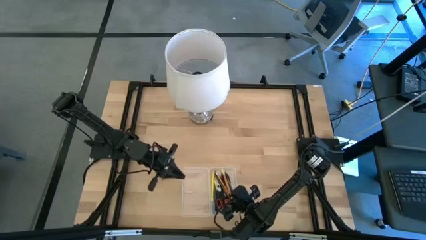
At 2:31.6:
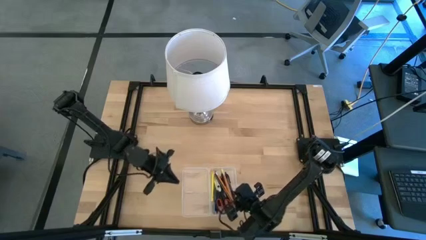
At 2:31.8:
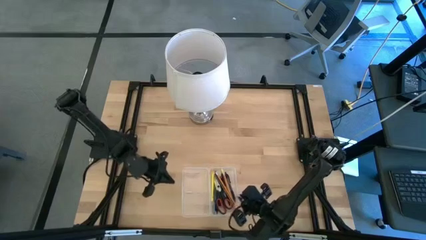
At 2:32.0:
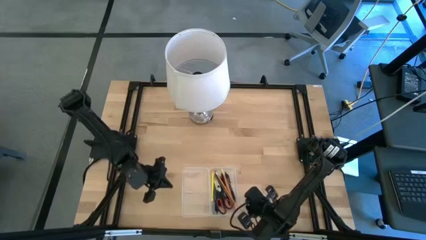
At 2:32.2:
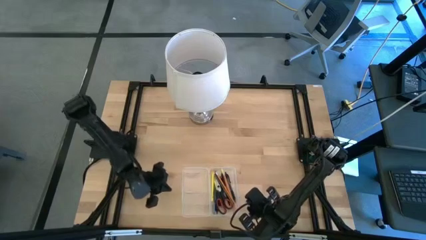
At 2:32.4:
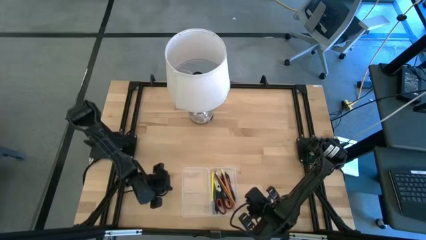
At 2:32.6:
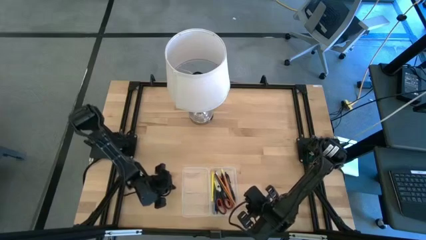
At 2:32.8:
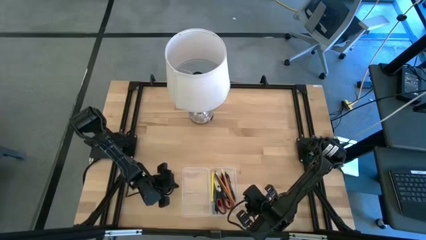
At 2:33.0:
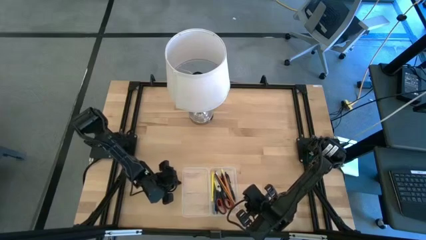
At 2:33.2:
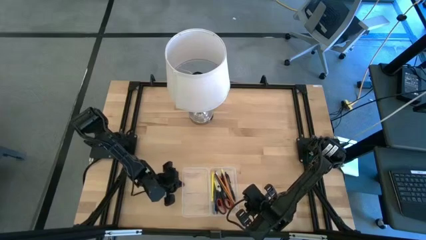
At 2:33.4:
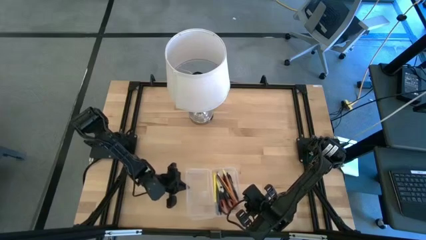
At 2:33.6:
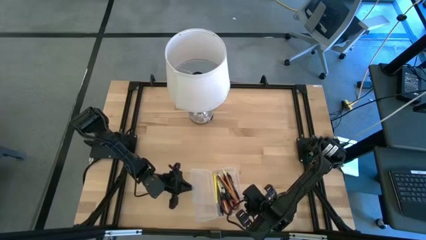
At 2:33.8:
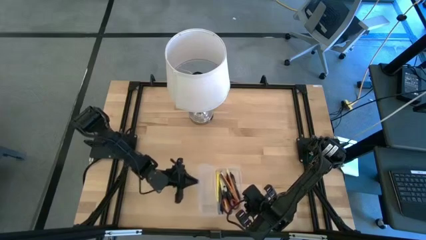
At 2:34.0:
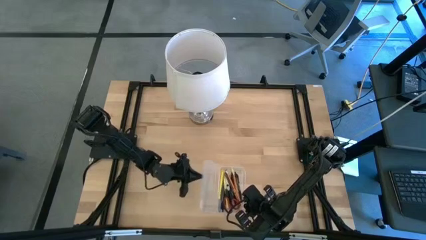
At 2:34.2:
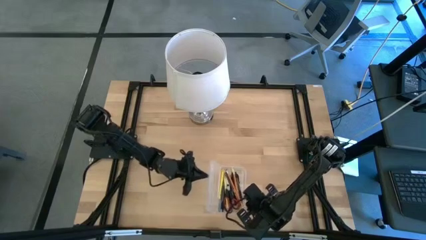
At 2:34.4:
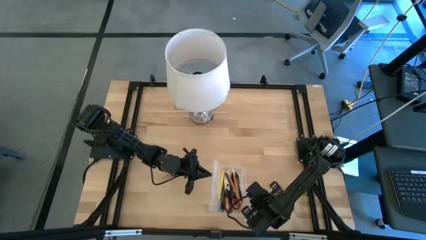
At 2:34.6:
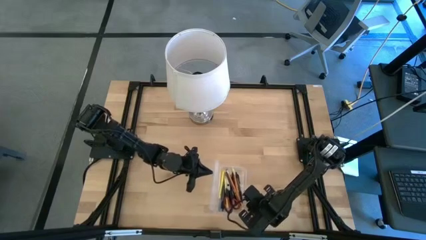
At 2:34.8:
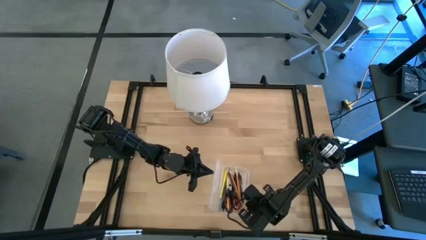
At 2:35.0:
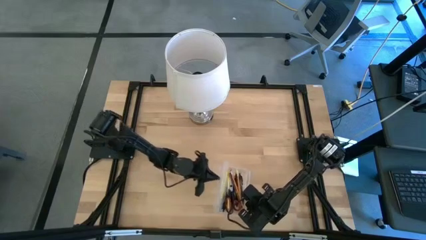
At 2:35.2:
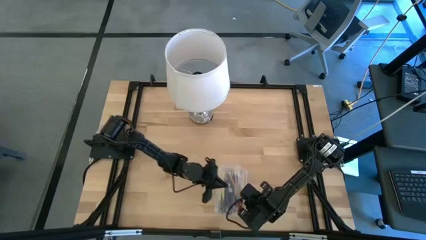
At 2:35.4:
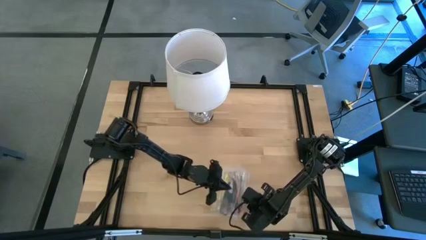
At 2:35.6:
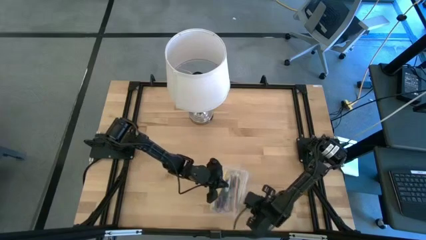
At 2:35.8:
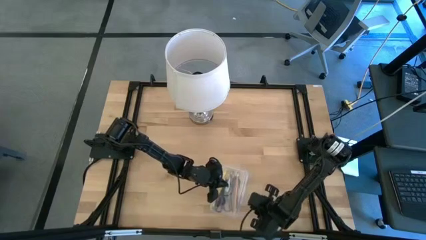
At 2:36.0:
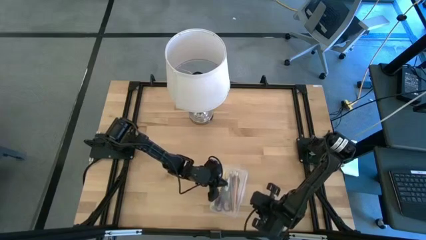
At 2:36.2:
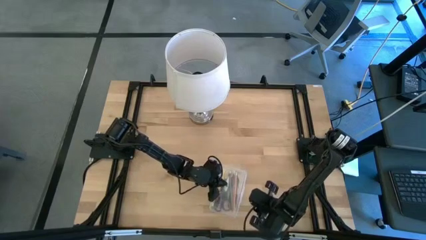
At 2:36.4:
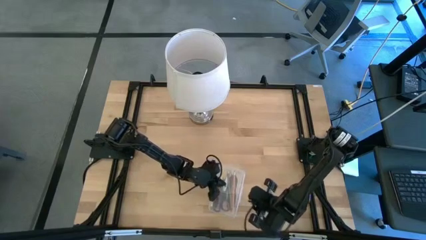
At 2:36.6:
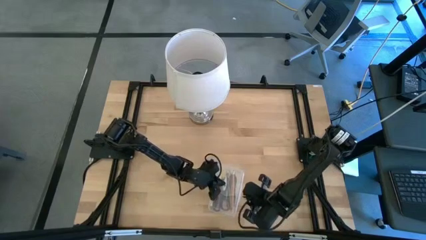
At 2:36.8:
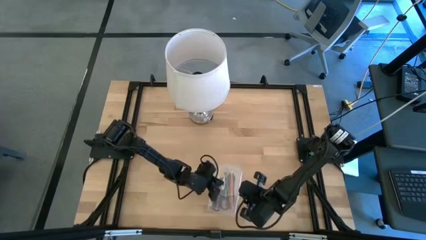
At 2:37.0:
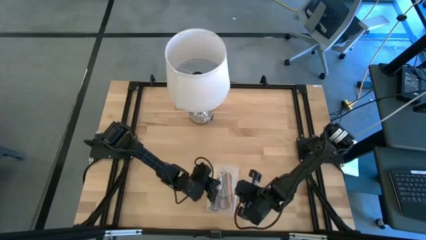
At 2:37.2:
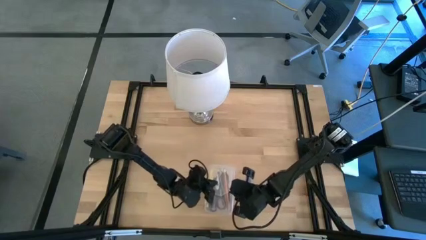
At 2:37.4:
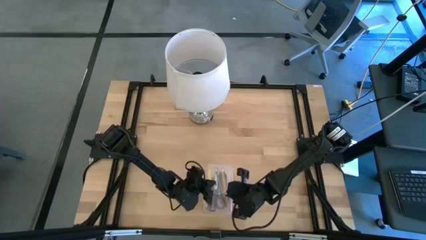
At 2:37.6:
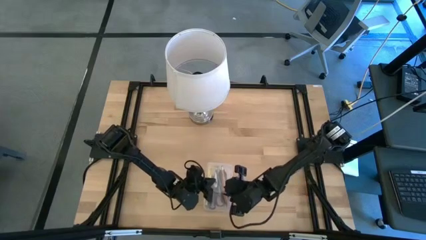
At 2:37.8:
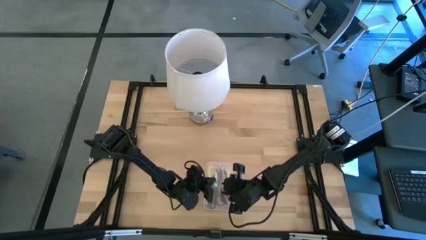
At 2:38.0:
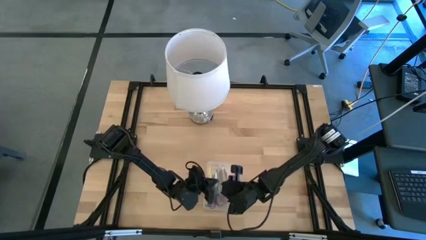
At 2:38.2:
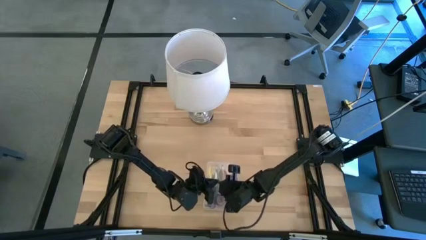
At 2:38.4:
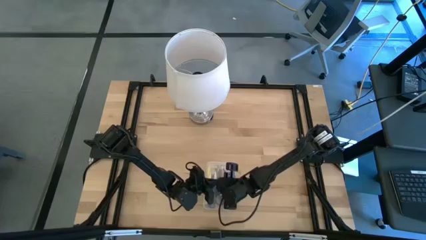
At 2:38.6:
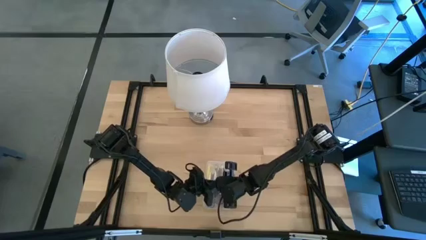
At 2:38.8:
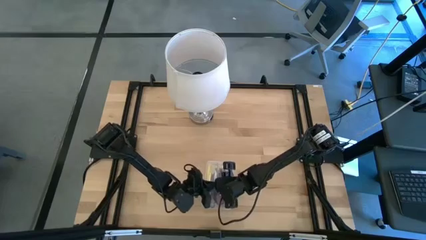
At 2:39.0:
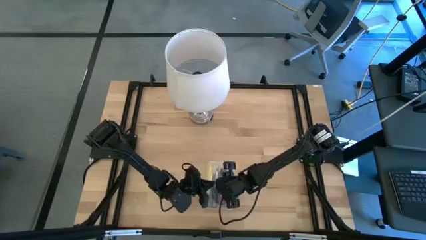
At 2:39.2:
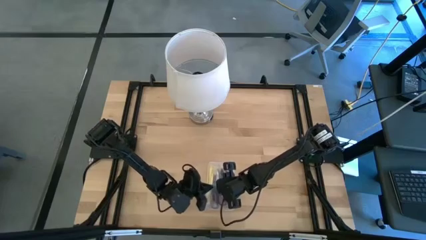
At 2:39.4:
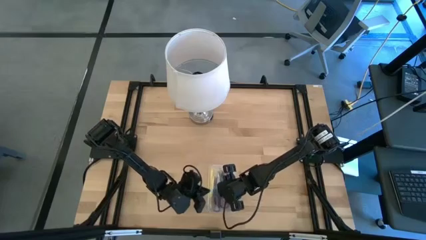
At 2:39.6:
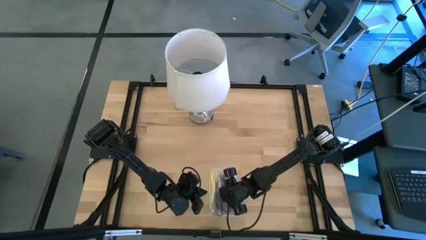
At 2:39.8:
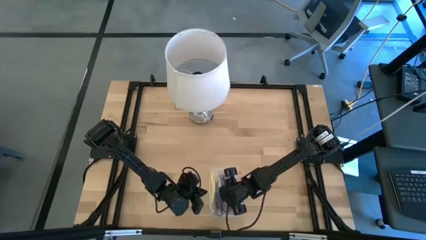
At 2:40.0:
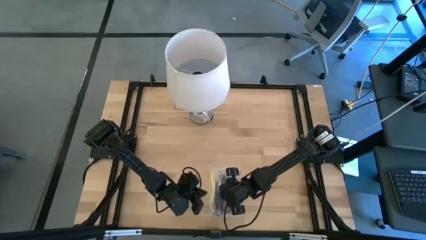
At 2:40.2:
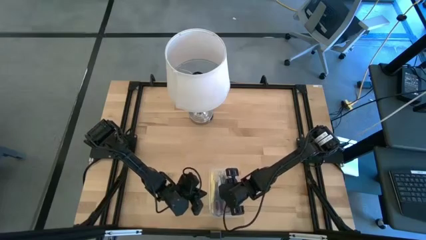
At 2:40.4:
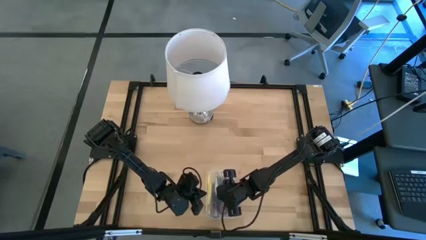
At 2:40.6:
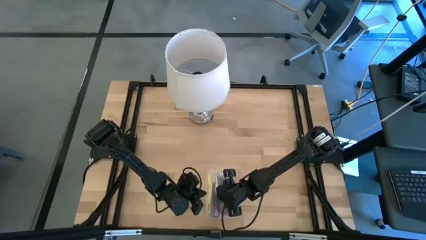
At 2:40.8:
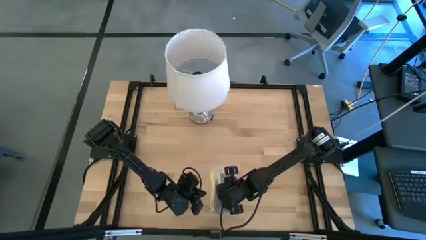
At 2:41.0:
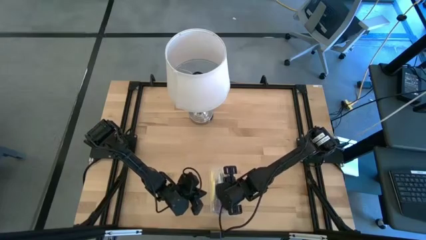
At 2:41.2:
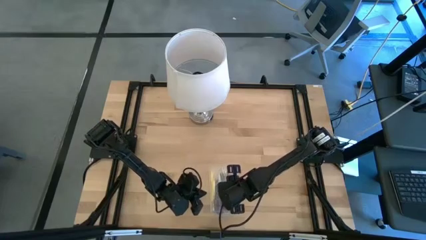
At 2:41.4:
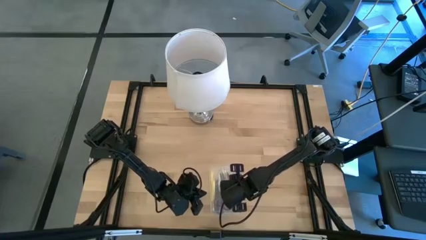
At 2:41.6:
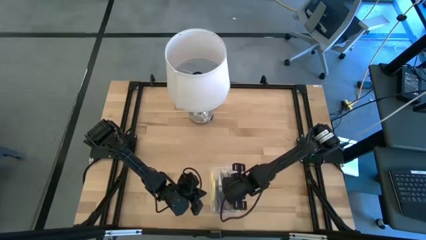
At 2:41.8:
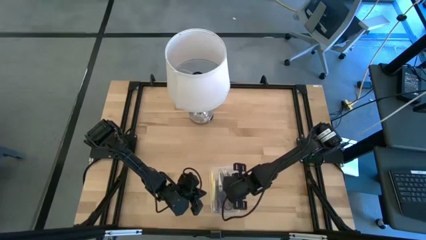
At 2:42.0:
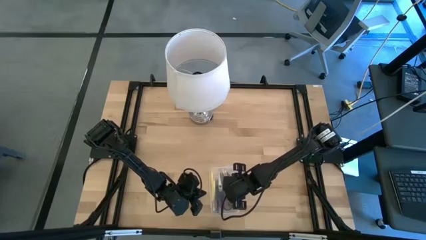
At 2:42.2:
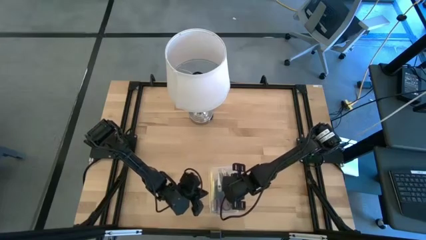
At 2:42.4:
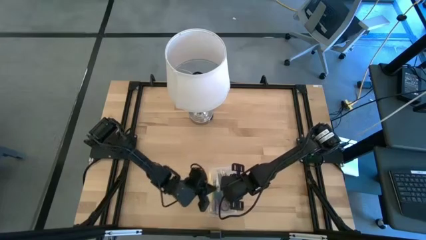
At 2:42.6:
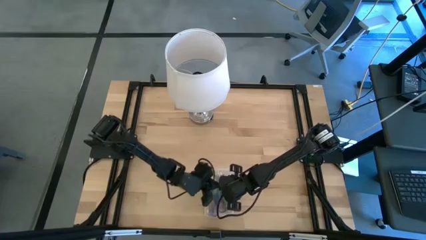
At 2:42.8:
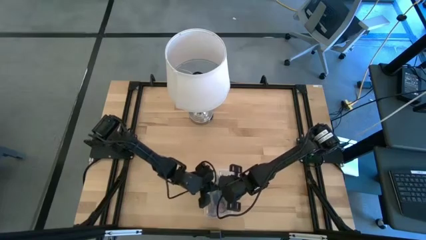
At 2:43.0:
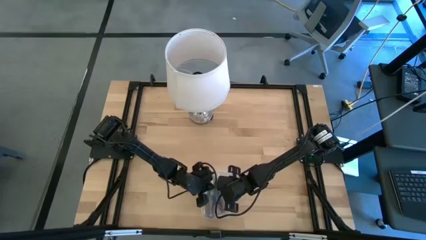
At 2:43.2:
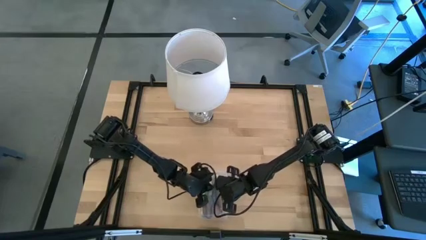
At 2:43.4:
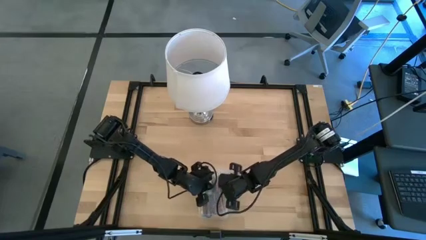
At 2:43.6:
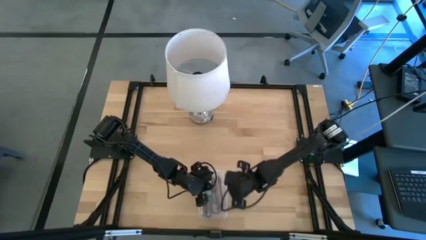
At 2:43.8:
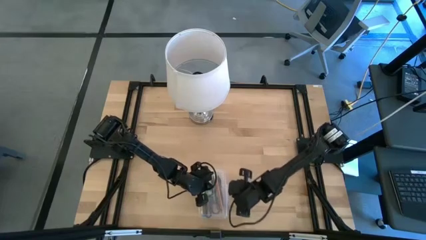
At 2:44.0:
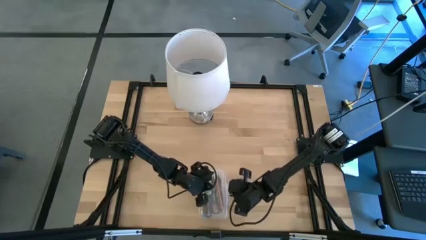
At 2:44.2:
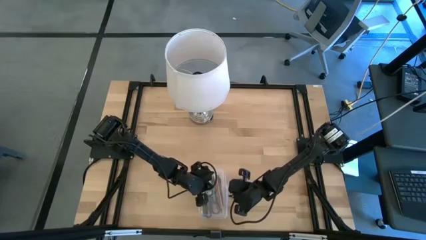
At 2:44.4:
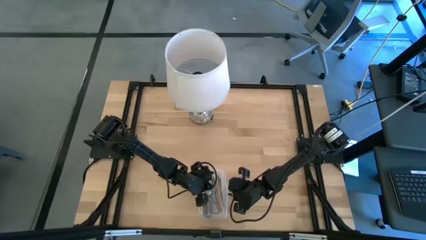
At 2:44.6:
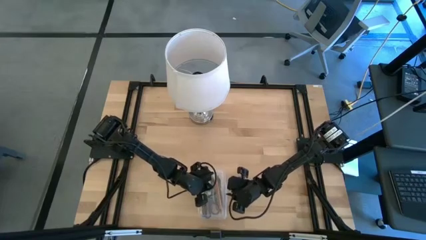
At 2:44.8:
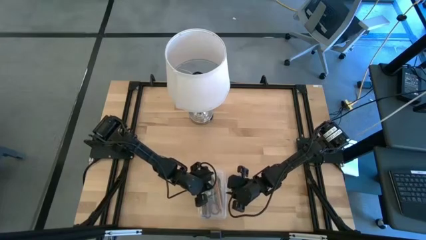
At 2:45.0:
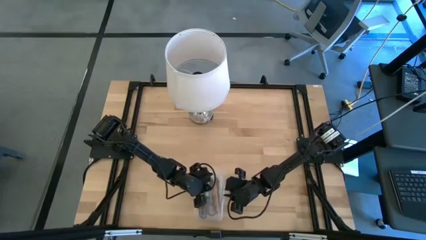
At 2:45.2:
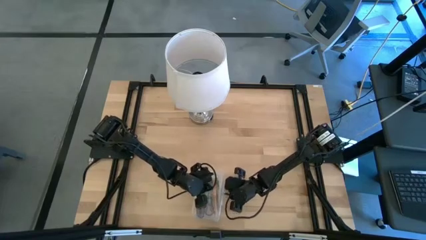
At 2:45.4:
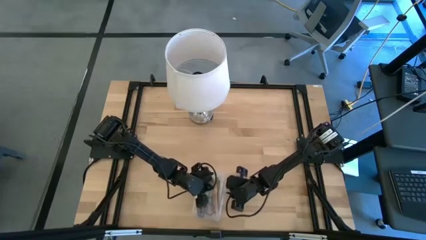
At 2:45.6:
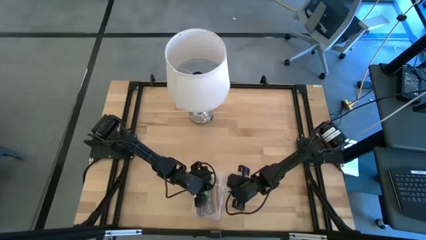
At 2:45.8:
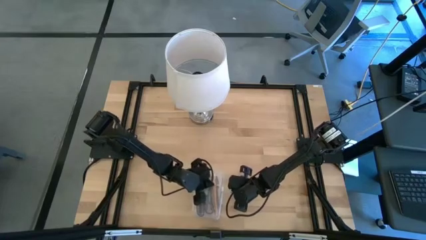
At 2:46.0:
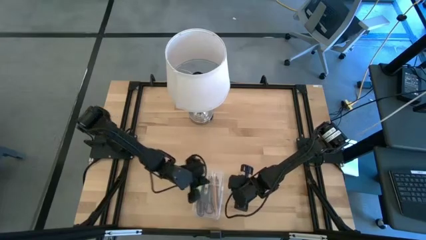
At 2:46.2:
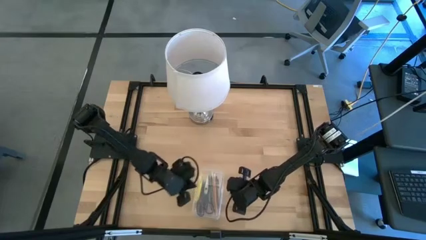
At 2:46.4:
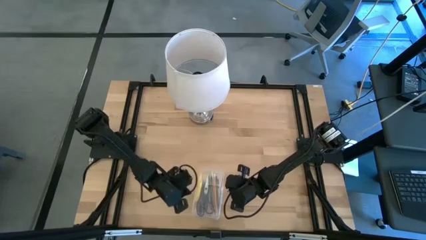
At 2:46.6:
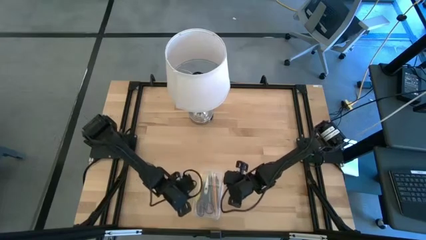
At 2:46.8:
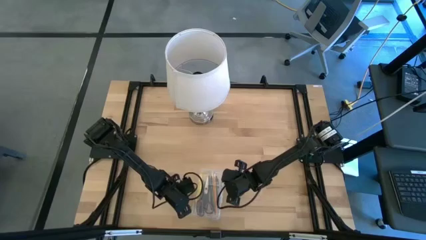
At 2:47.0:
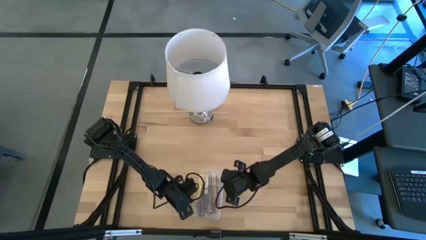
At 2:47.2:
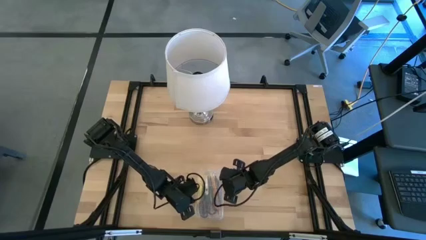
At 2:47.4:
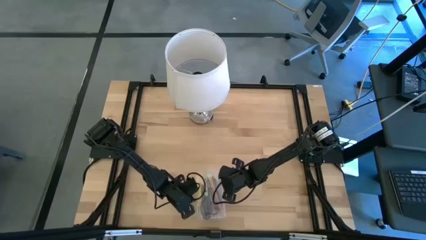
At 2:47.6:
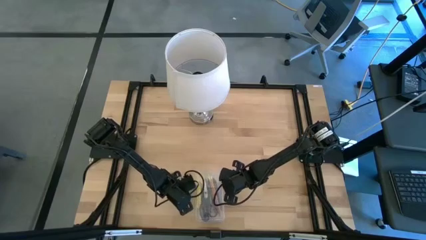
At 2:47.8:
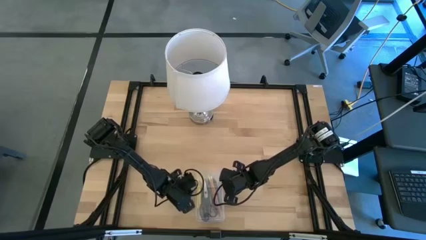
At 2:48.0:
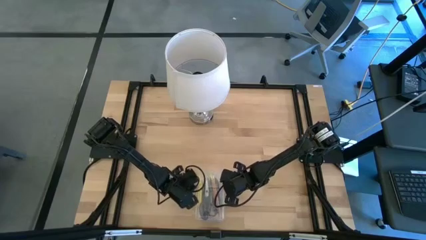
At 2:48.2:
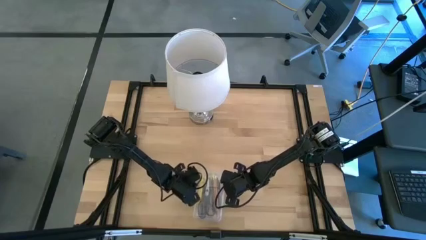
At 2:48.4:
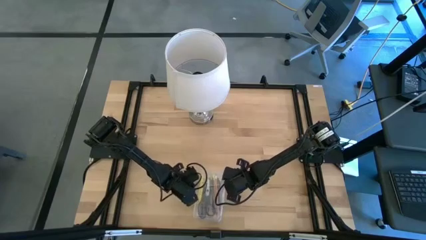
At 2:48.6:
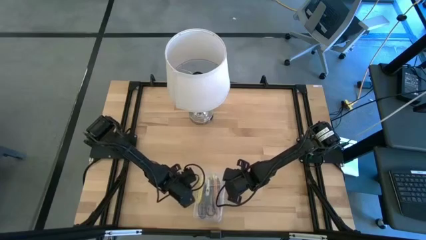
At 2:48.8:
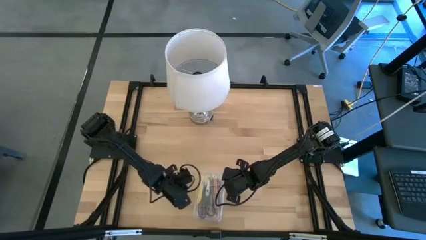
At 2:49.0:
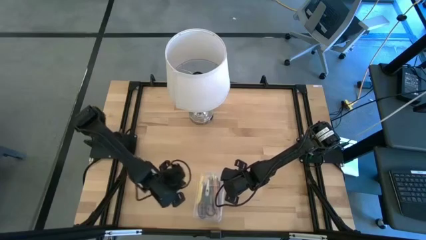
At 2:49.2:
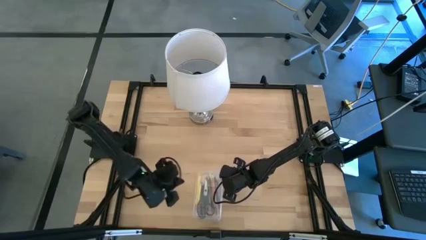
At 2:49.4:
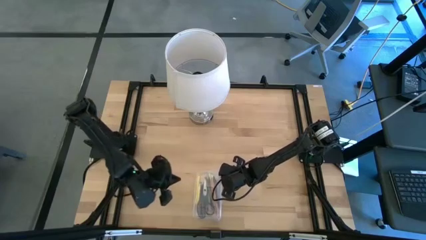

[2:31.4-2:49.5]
Task: Pick & place school supplies into a supply box
Close the transparent supply box
